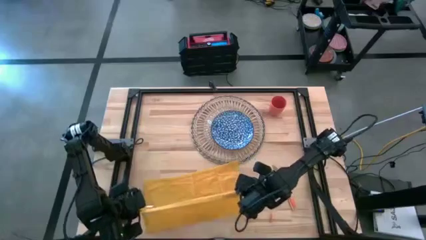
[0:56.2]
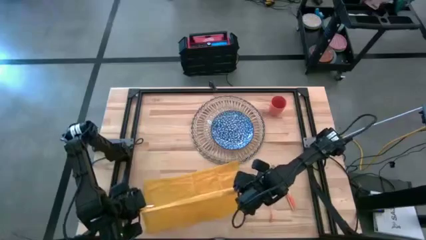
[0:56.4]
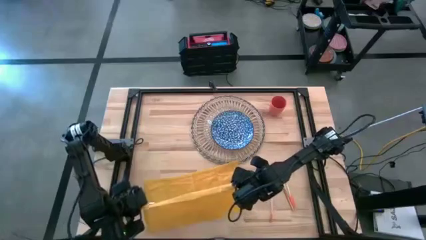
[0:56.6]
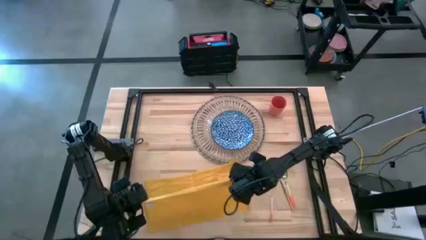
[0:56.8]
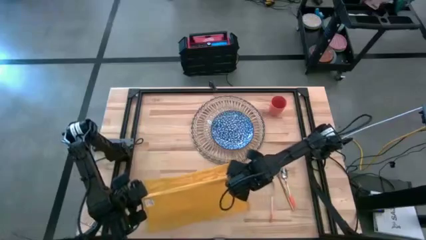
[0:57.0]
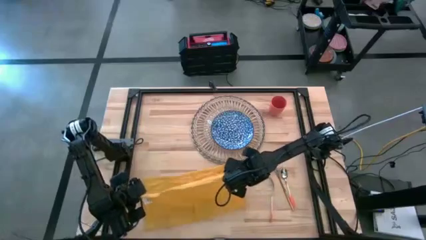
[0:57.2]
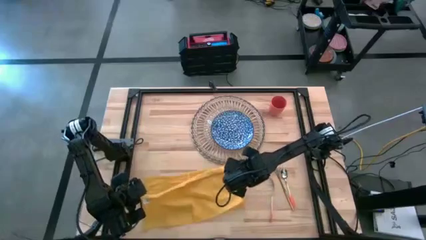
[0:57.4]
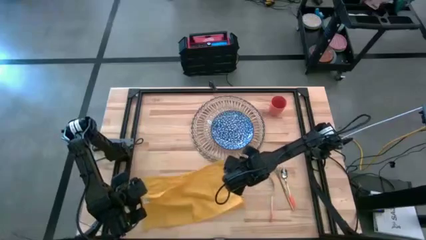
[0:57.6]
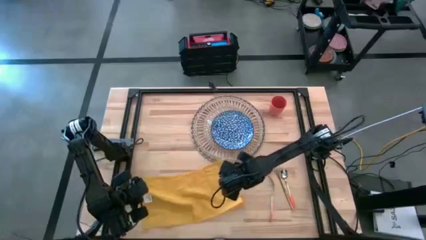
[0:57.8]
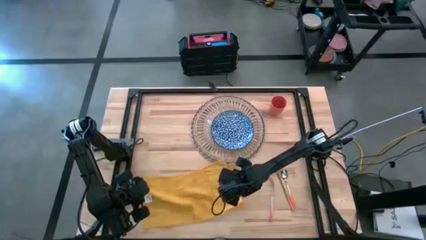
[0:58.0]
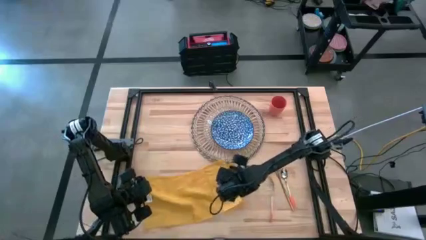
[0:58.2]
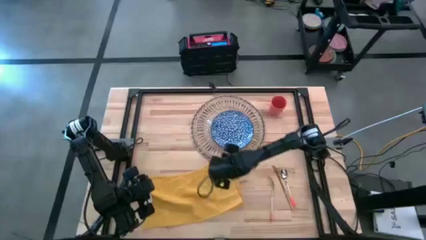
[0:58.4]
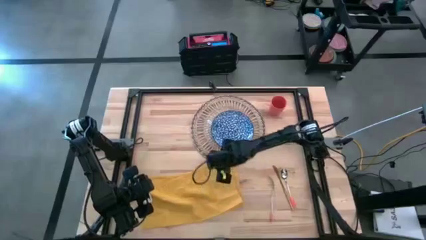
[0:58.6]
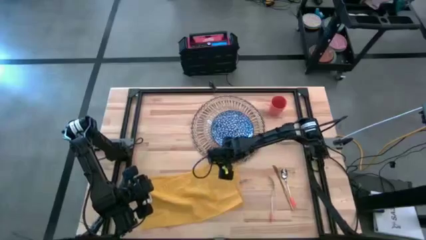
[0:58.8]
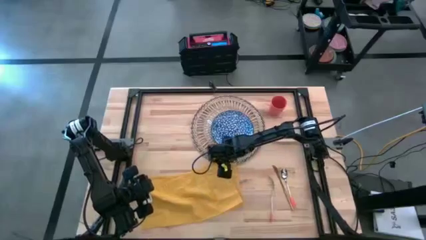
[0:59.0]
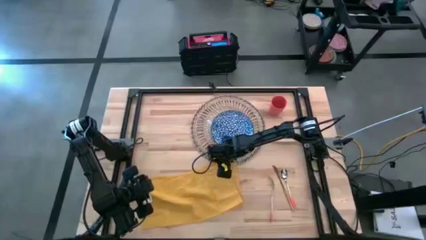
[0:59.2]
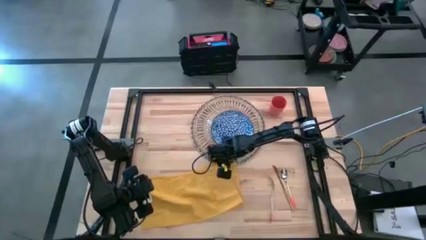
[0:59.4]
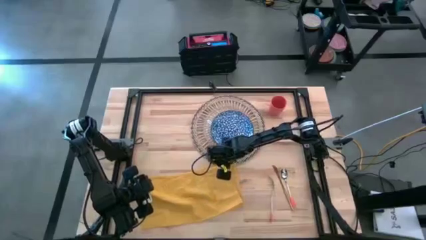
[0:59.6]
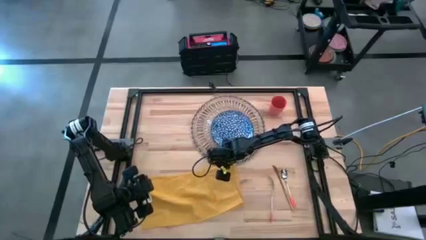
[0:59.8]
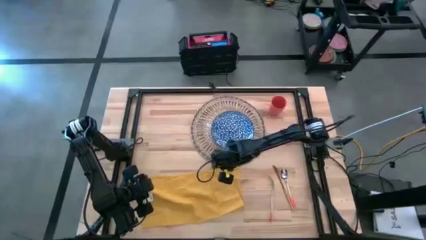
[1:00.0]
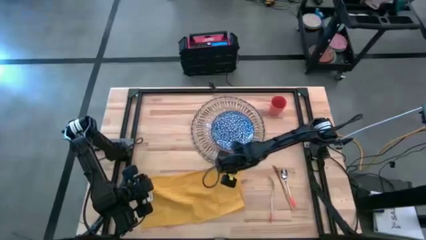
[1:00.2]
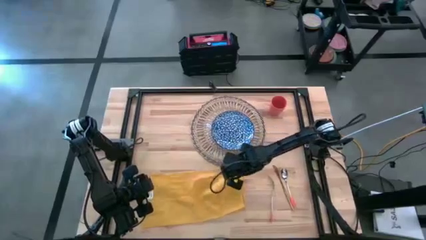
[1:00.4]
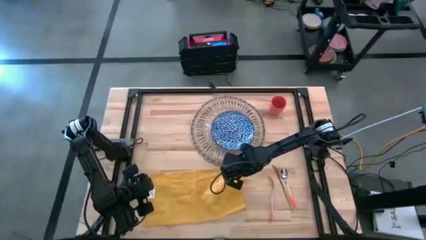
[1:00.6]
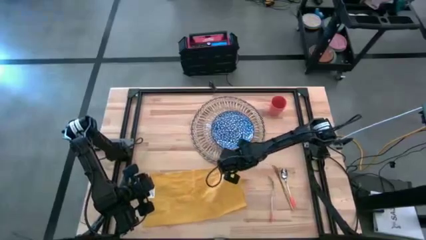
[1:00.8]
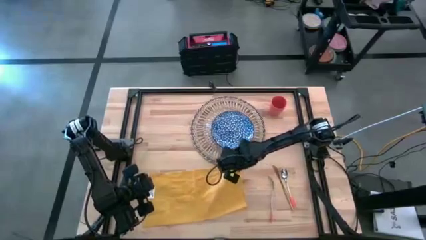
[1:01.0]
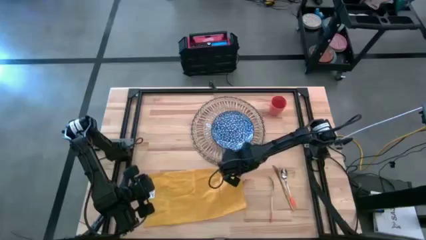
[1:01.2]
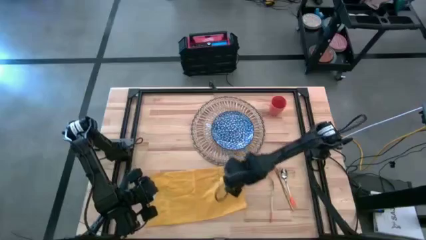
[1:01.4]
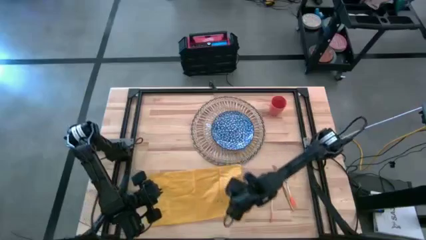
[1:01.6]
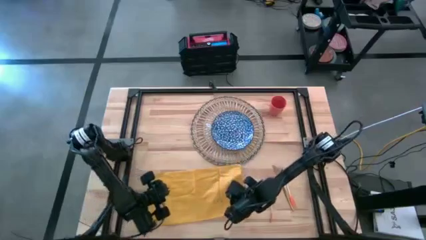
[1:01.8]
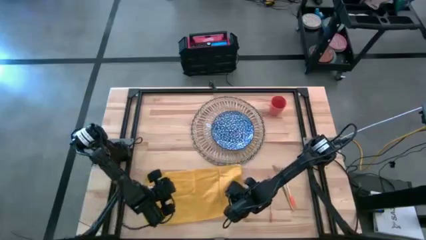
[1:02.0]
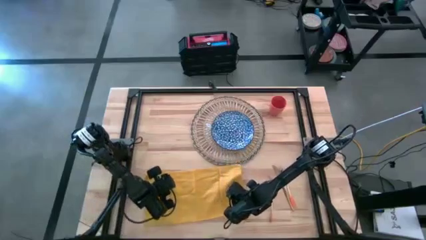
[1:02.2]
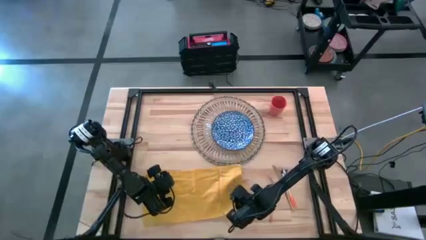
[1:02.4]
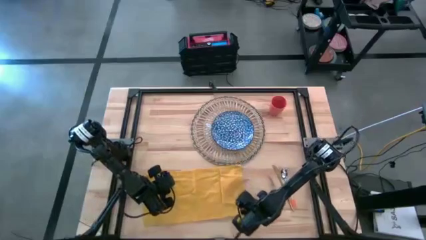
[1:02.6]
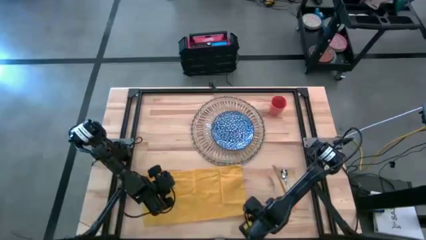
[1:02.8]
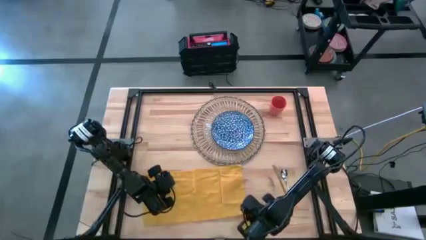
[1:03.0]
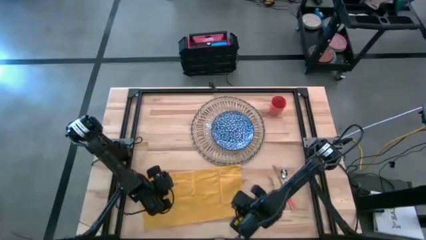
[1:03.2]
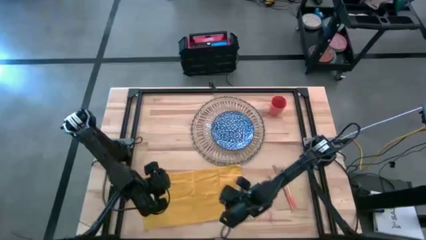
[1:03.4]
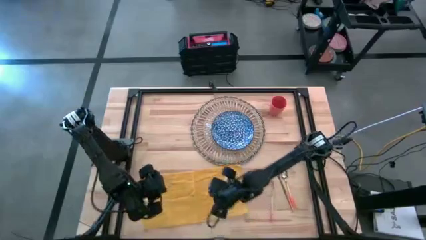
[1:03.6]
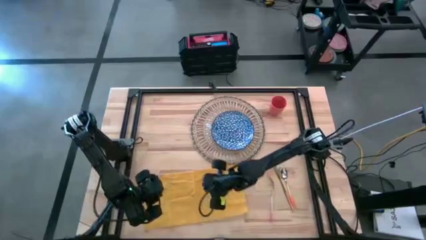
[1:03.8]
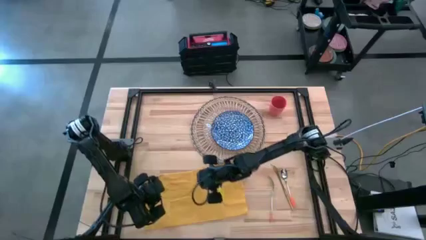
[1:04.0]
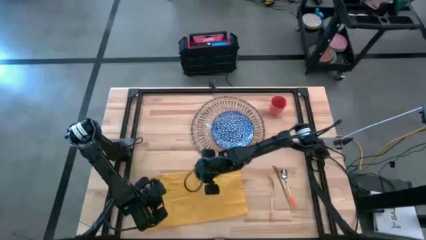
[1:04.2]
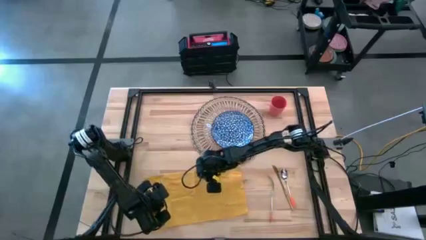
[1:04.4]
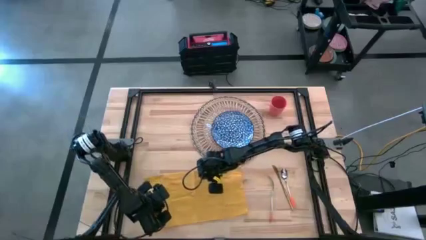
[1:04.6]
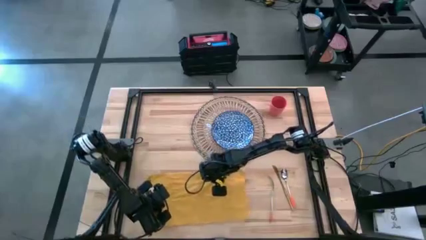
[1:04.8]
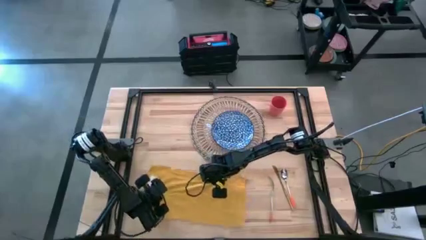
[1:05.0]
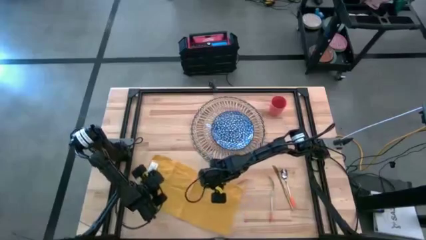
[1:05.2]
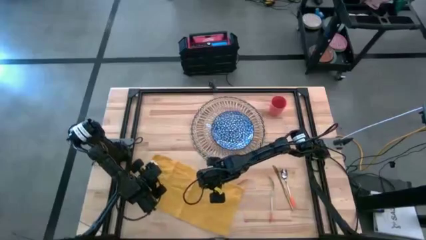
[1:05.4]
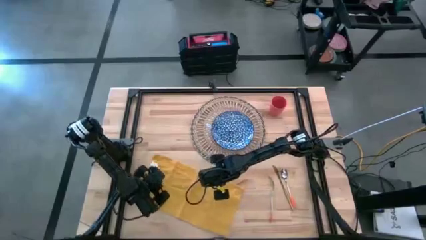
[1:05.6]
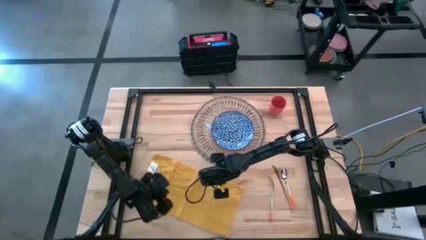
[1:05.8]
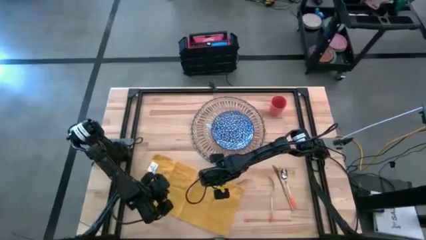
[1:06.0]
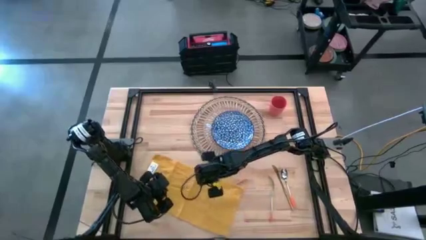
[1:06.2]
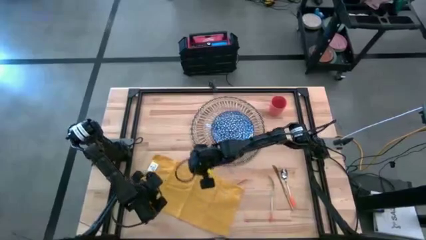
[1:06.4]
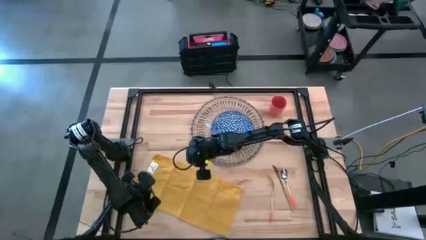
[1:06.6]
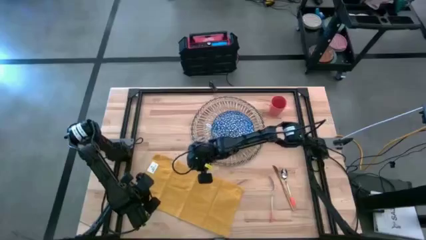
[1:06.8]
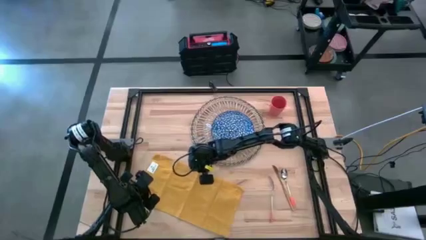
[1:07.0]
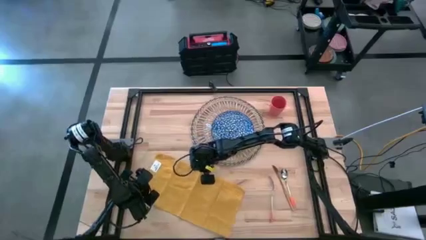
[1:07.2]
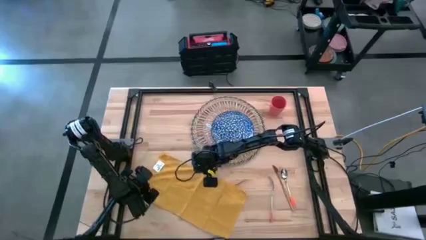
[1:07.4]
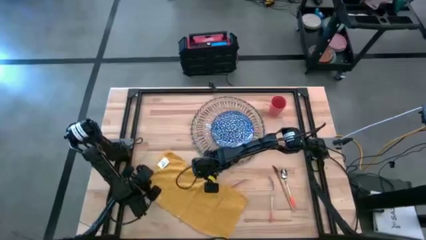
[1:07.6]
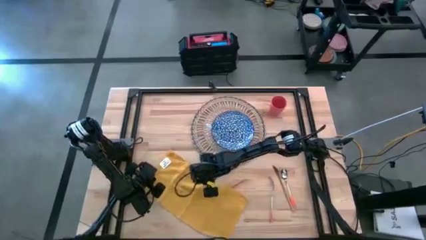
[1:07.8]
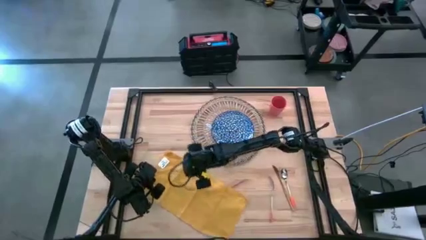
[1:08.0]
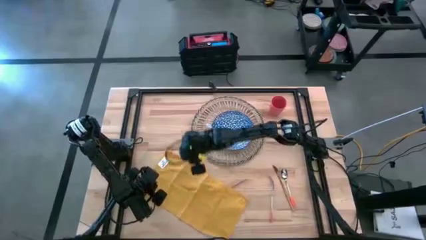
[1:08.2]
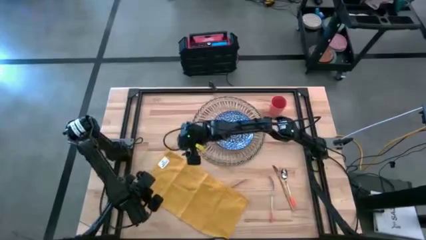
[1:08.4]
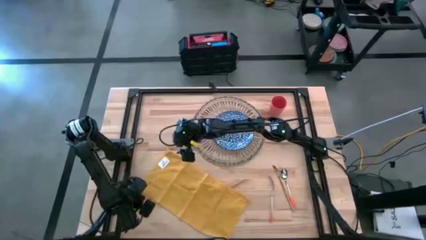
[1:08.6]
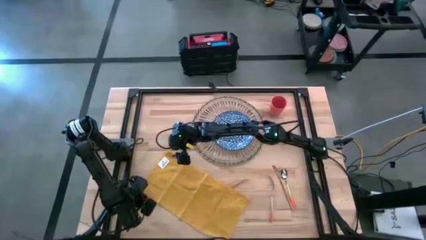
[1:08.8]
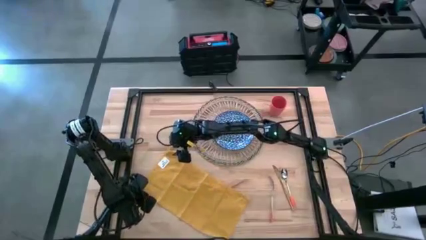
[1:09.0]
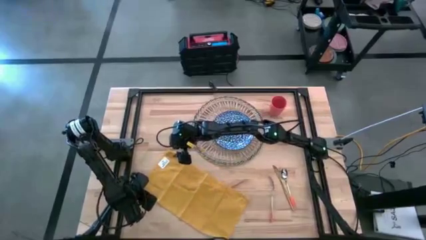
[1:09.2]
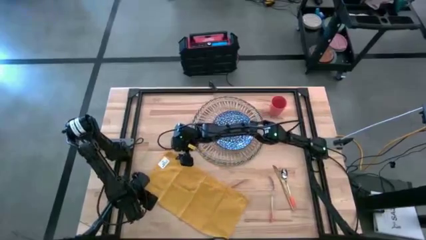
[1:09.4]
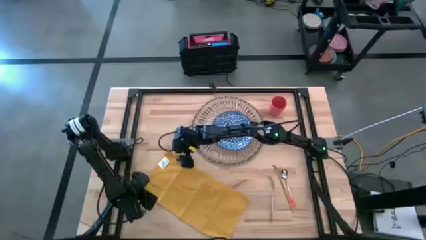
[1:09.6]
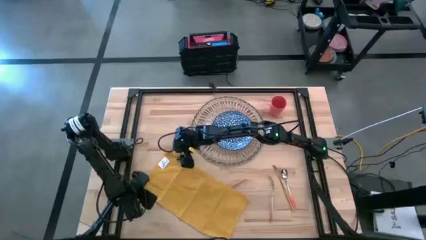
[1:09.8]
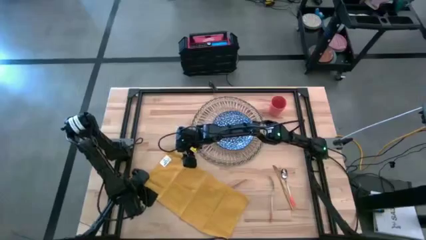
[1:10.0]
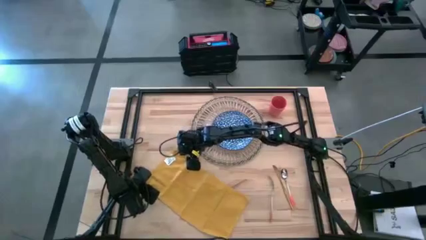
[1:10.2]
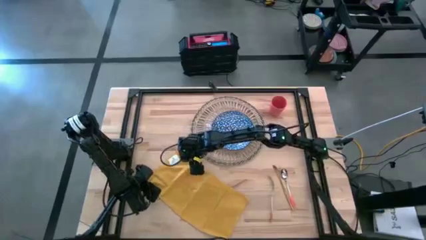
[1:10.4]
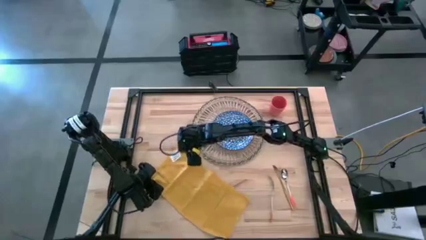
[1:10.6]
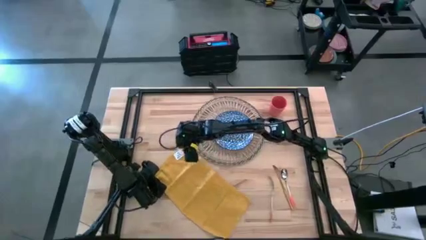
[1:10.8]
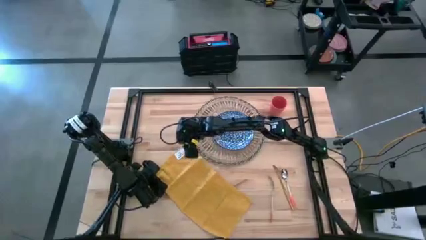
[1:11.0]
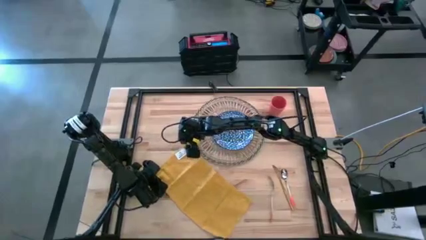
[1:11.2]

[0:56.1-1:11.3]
Task: Set table place
Fold the yellow table napkin
